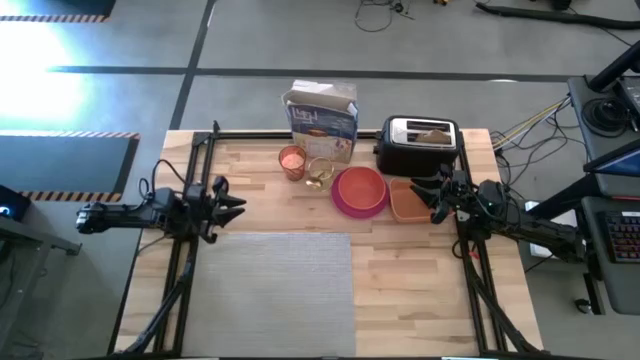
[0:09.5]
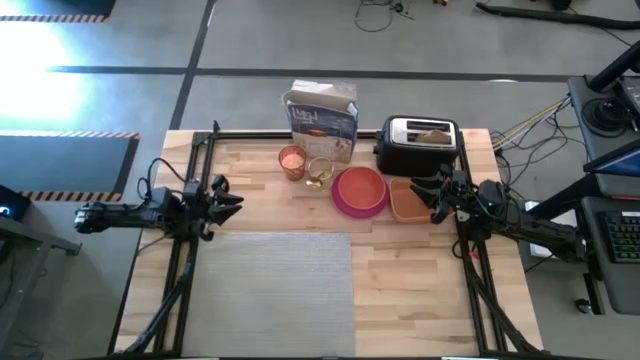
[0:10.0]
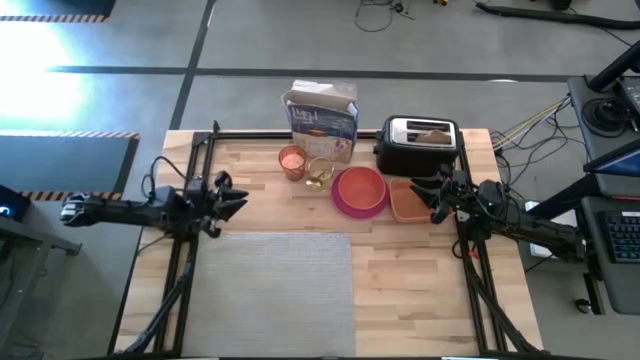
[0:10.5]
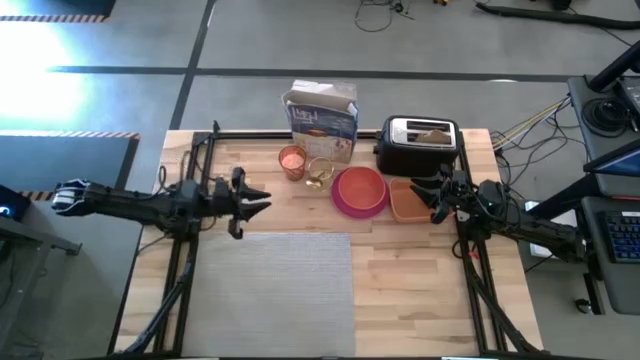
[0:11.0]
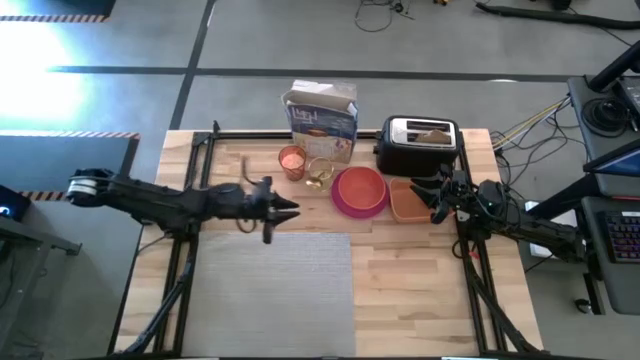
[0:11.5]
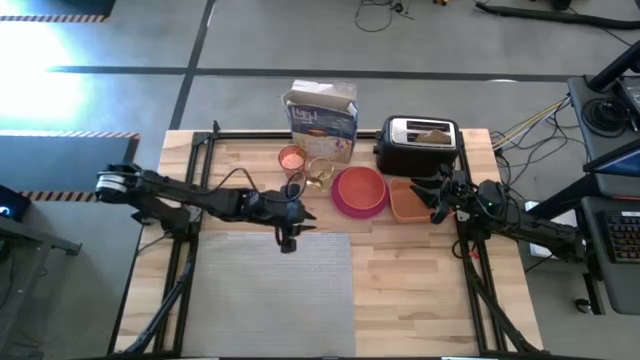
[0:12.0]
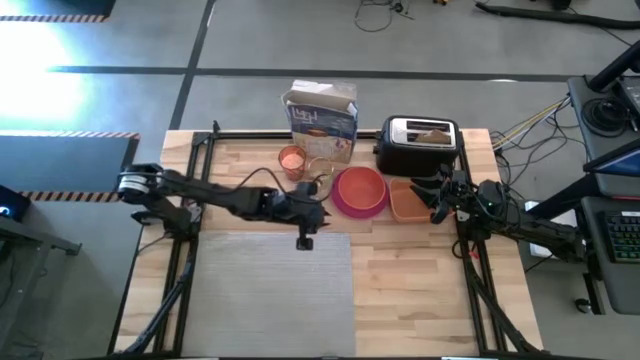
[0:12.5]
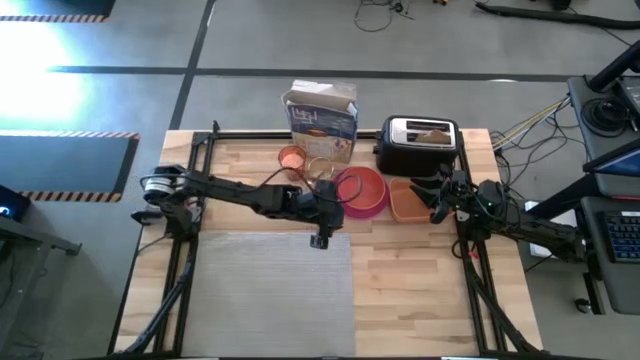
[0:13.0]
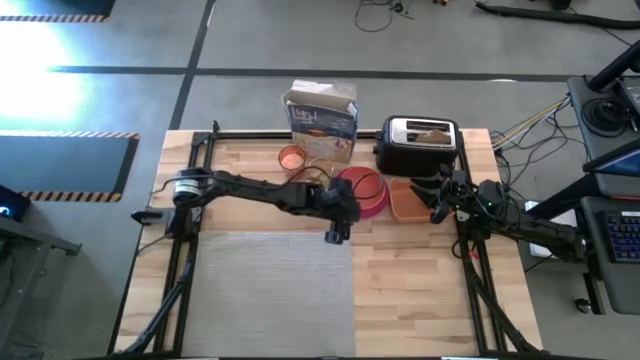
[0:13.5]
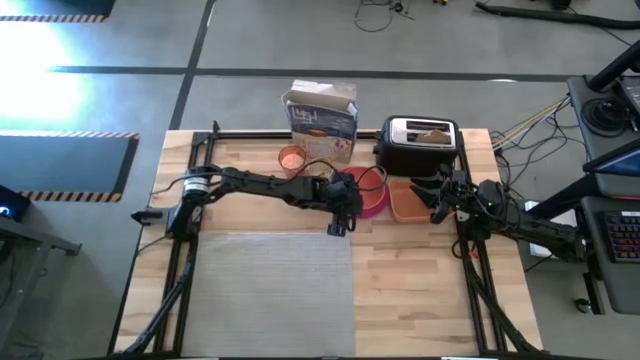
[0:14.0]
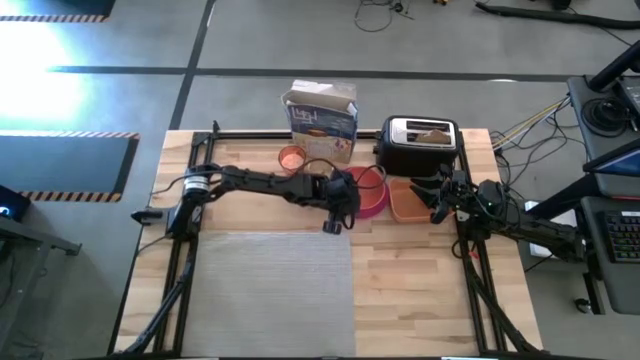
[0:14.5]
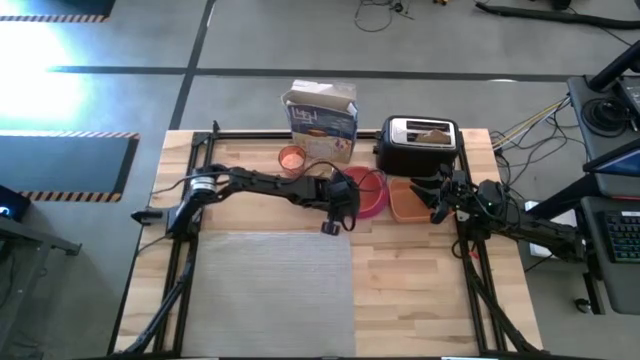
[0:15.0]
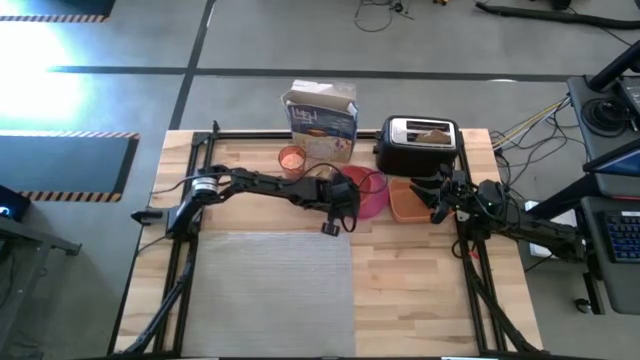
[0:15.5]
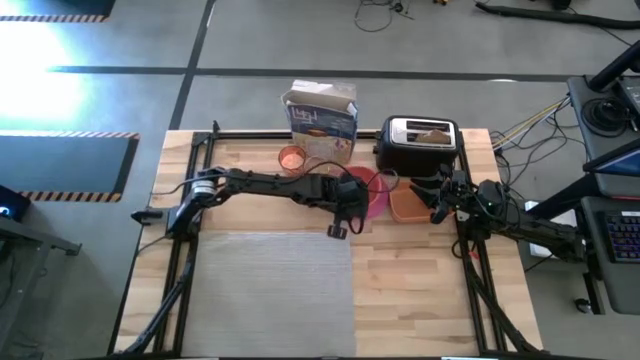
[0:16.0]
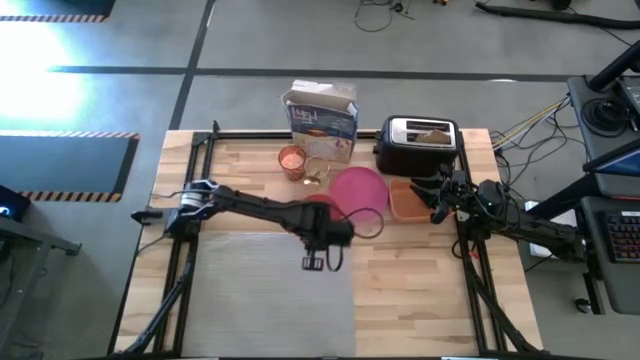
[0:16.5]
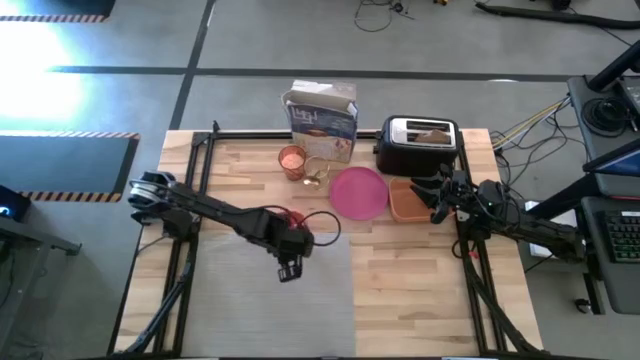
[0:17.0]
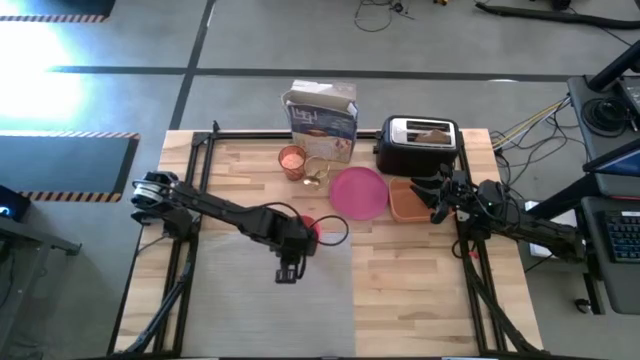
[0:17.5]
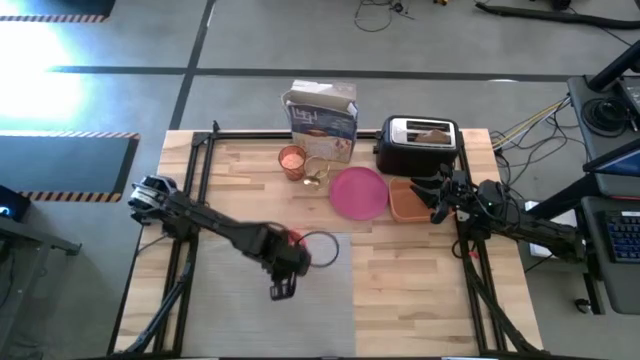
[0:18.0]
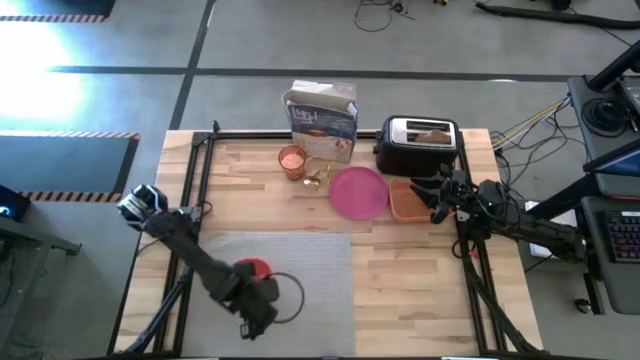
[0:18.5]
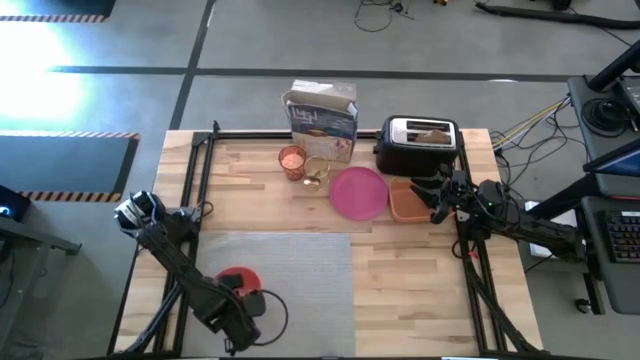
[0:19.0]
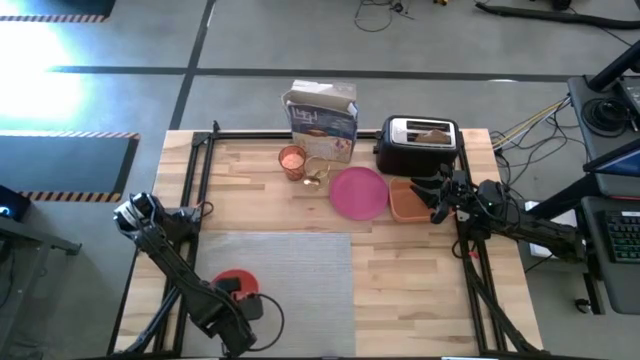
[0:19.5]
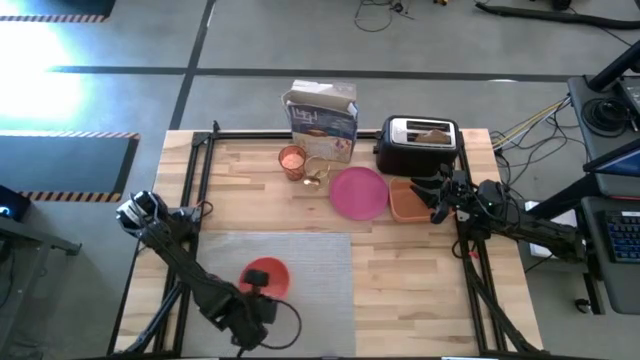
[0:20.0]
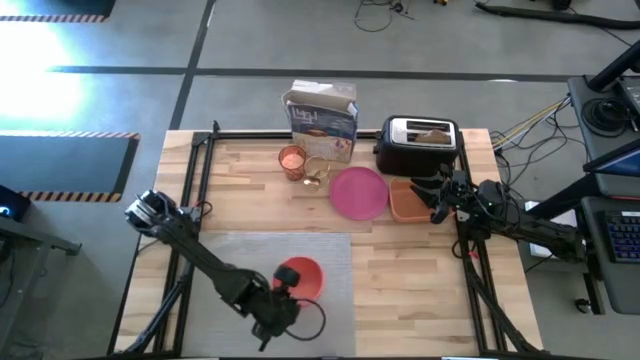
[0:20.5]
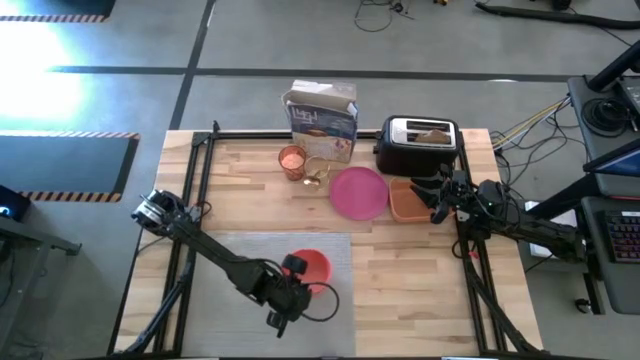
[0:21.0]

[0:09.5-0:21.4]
Task: Arrange a breakfast setting
Put the orange bowl on the table mat

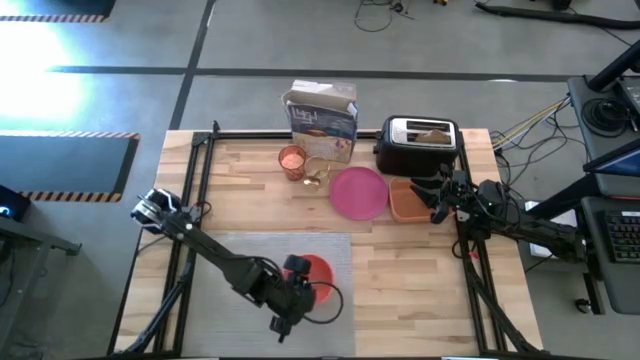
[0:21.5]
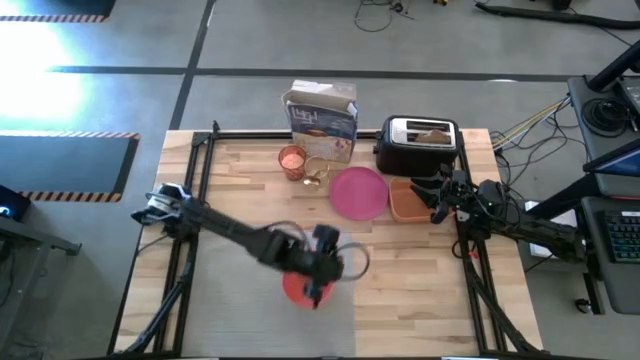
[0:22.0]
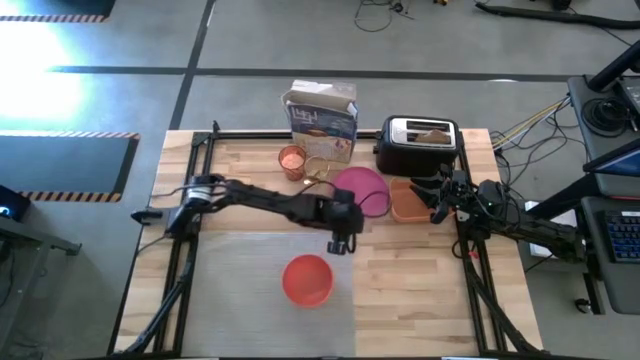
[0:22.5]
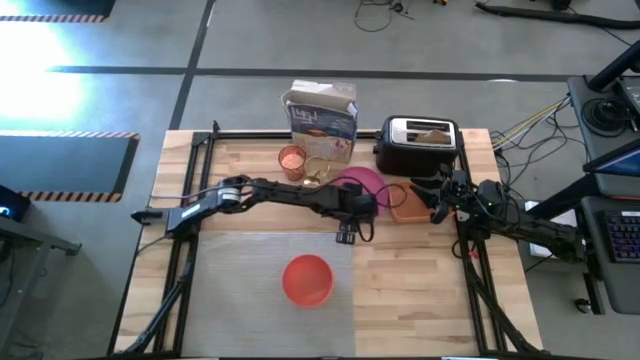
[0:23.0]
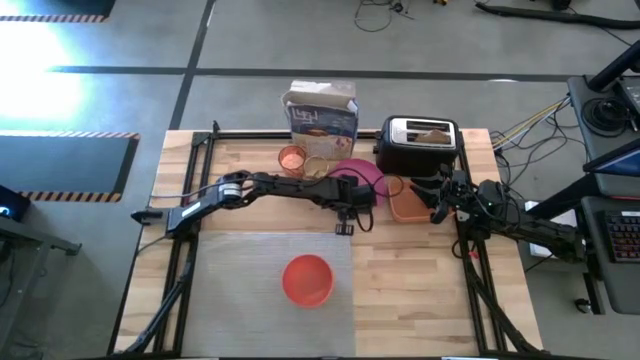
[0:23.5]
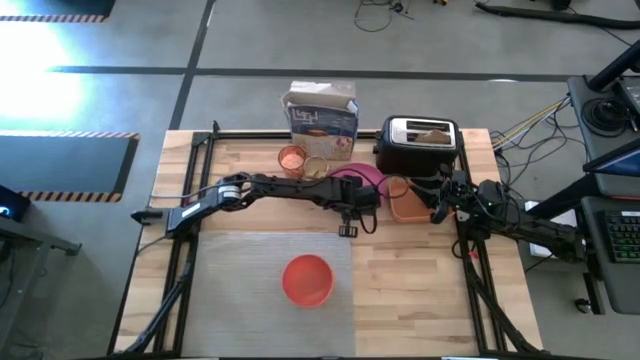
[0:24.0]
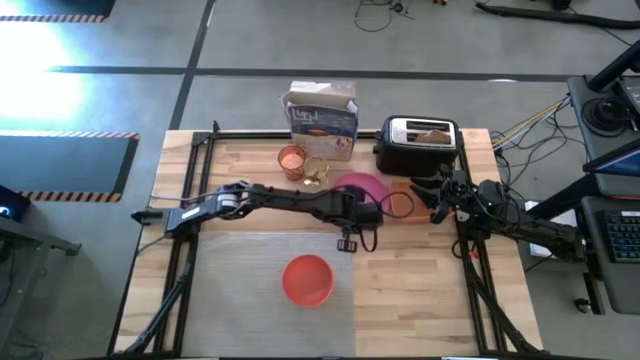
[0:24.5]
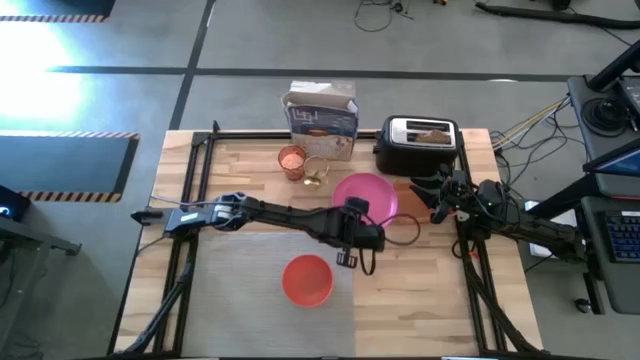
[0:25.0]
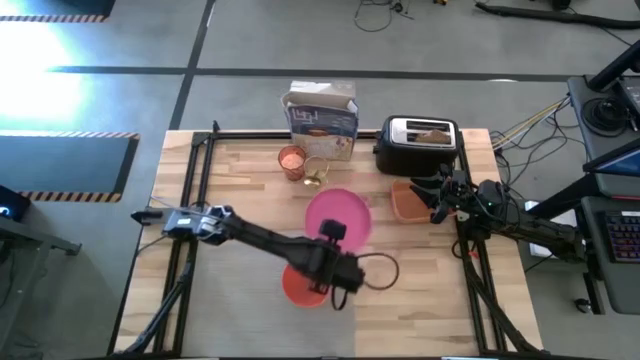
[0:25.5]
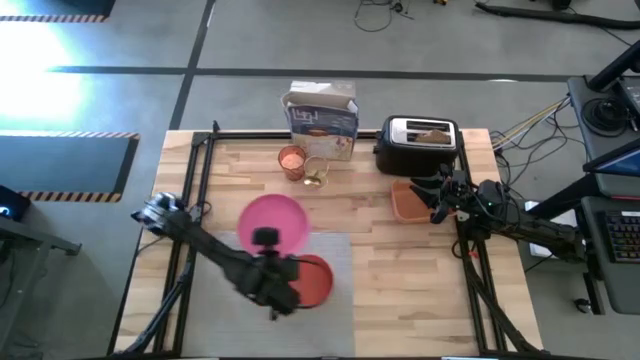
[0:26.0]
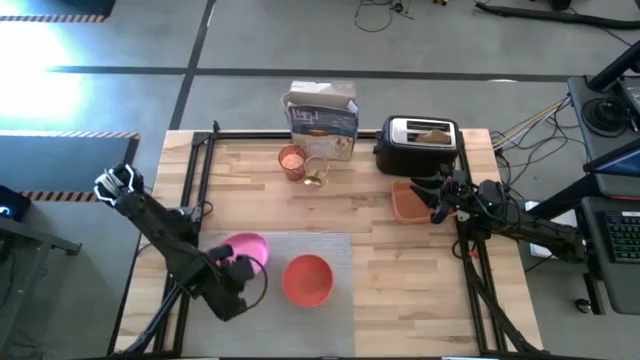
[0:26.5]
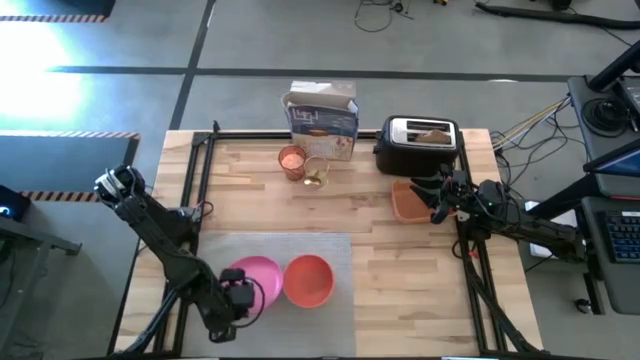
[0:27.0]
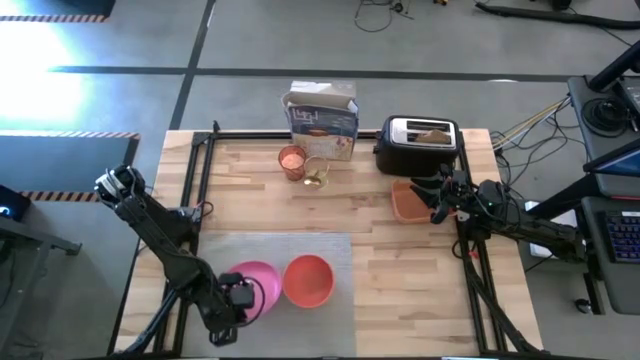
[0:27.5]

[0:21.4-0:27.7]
Put the pink plate to the left of the orange bowl on the table mat
